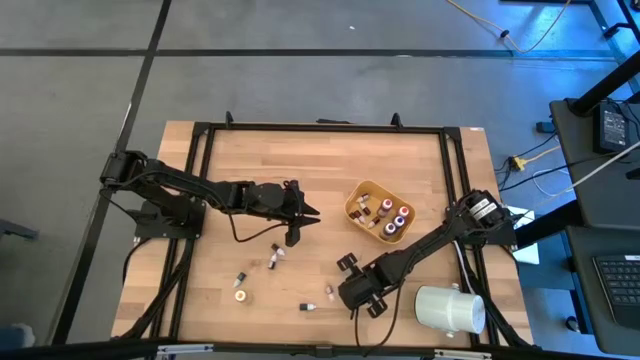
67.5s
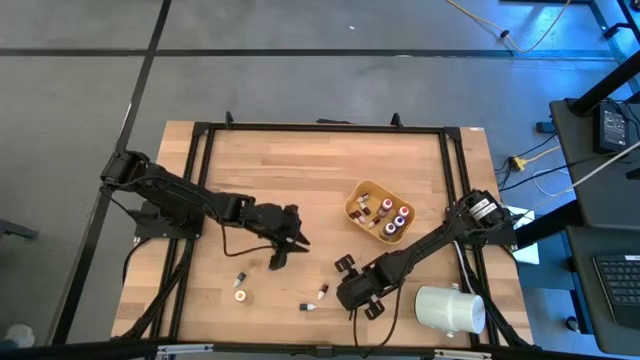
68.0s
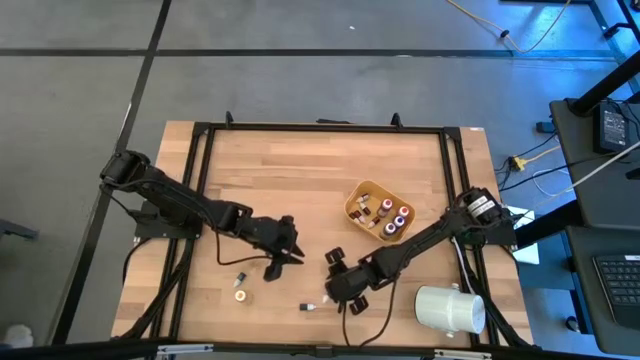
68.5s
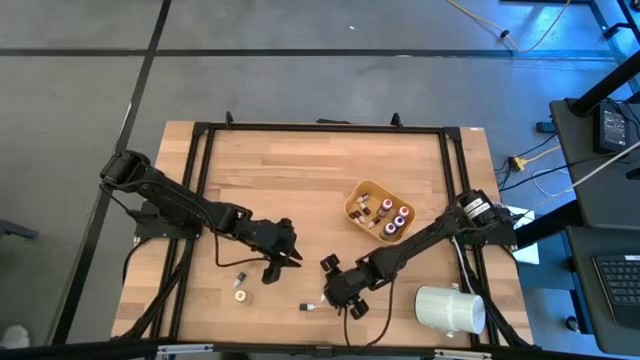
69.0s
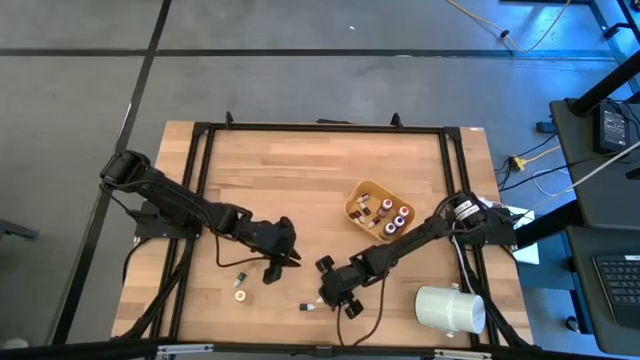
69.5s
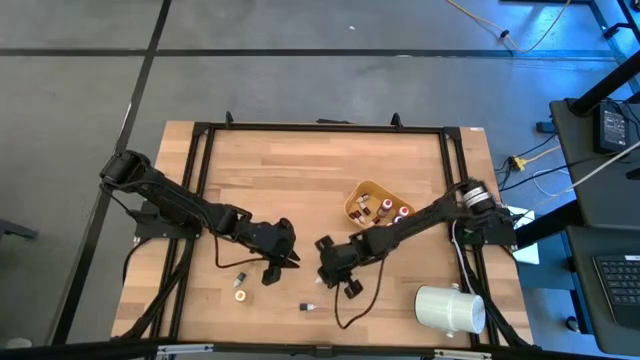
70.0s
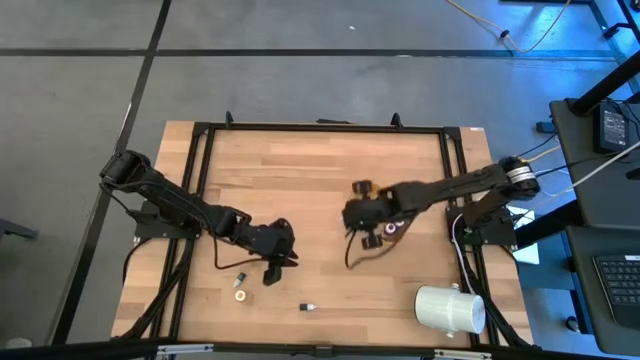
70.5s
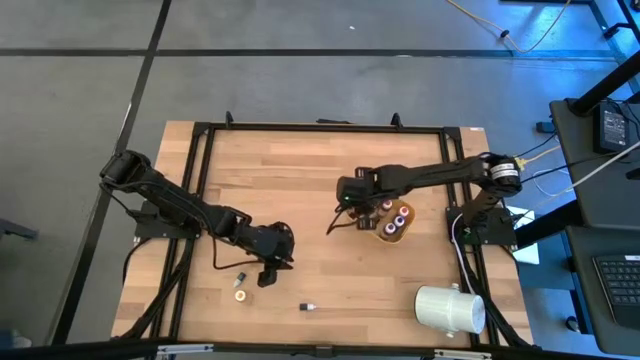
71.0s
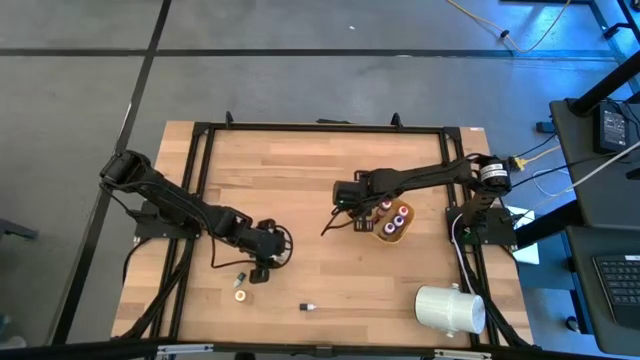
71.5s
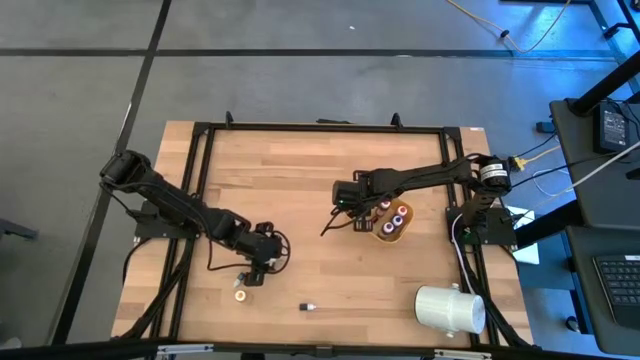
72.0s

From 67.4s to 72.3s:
Task: Pick & Place food coloring
Put the small pink food coloring bottle in the yellow bin

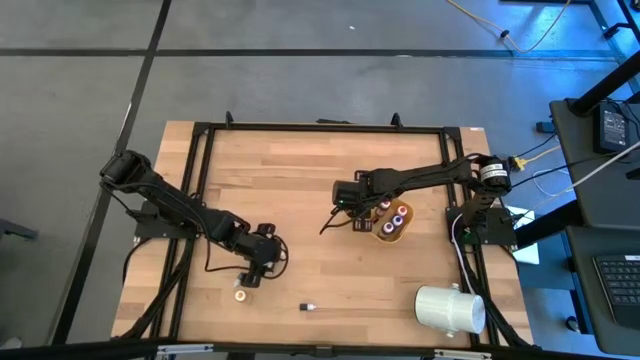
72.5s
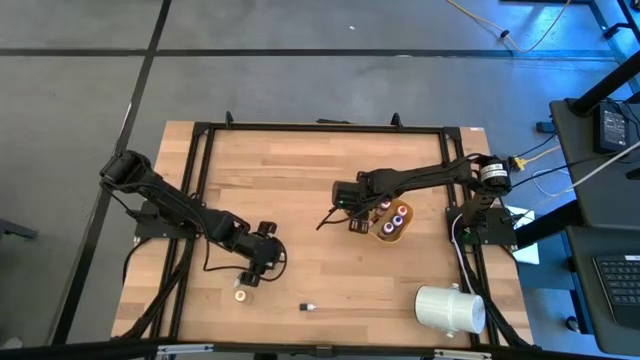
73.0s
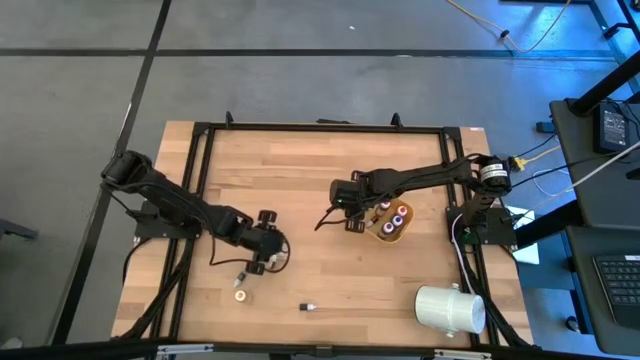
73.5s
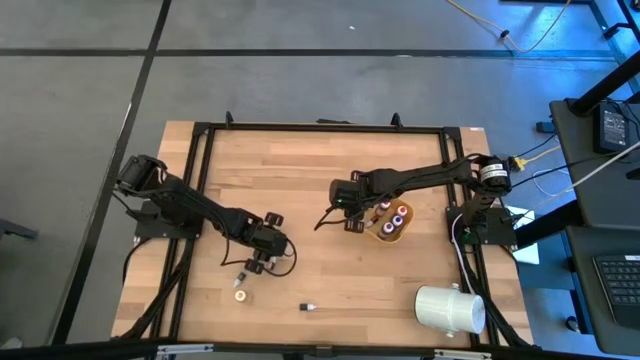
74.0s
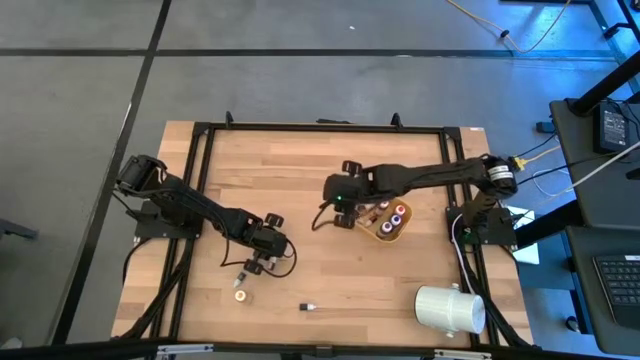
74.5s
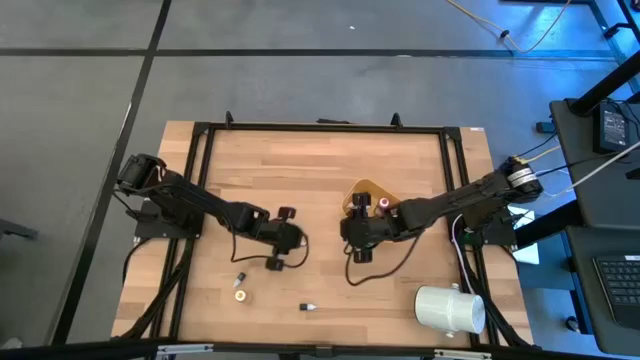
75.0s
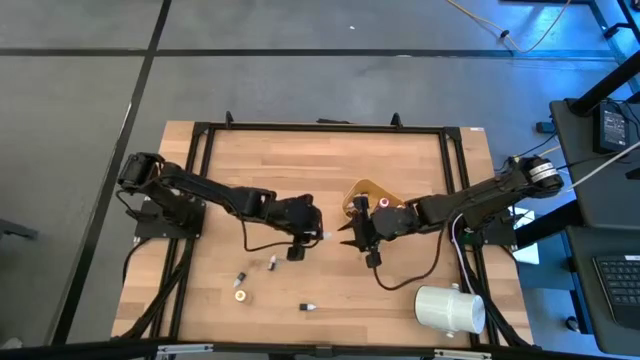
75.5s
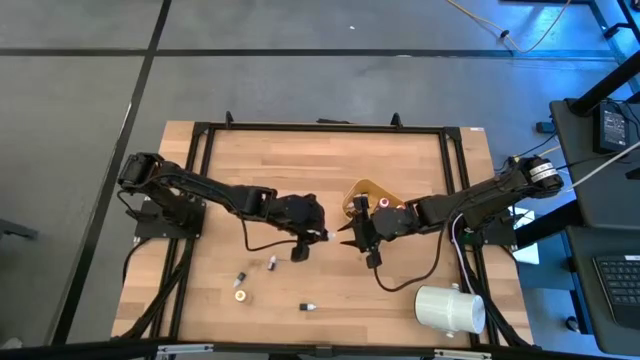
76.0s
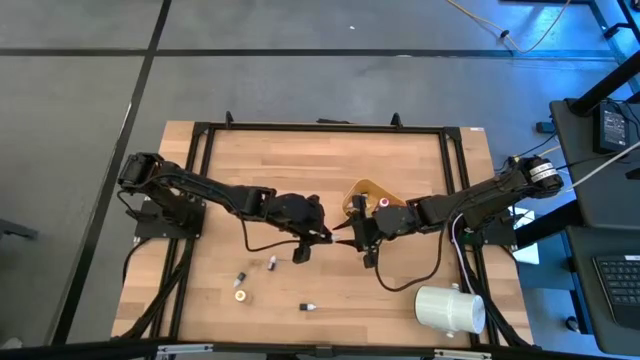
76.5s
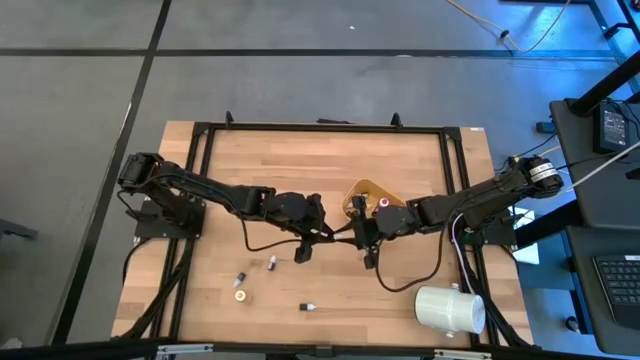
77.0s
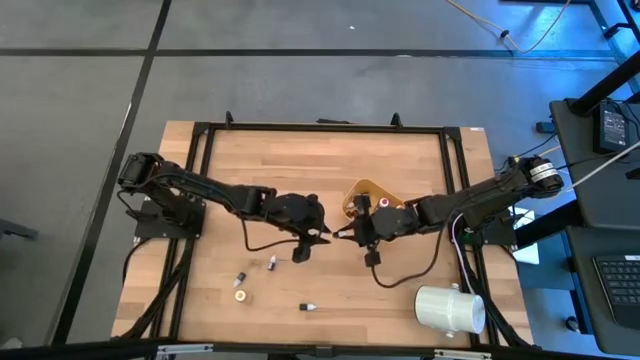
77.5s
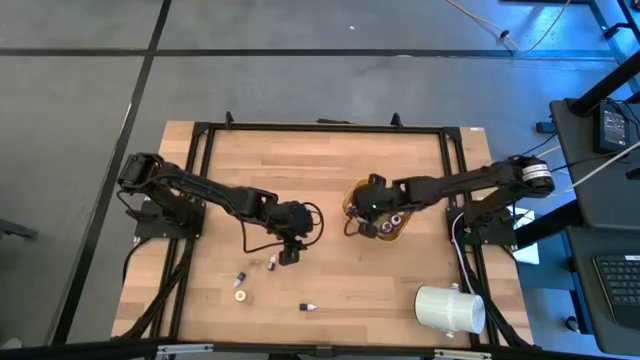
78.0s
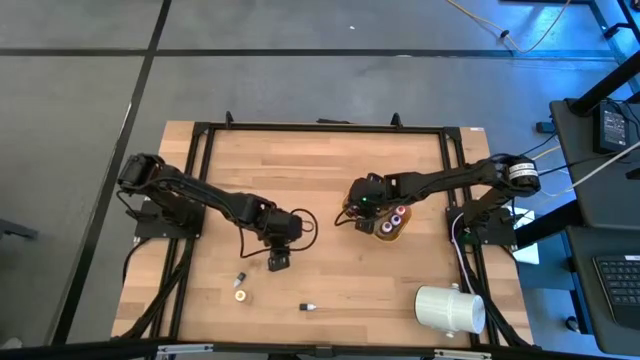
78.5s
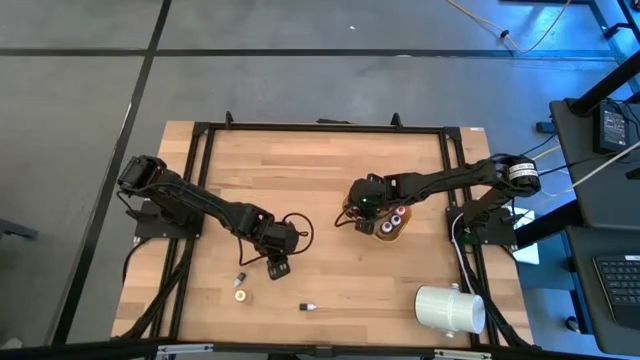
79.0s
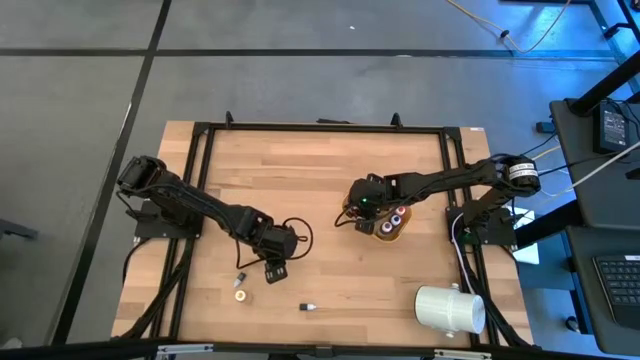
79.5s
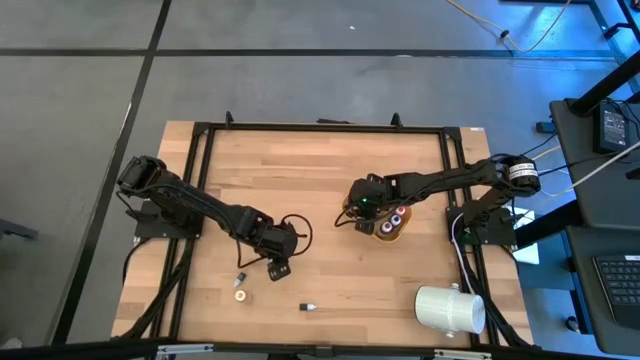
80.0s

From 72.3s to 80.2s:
Put the top small blue food coloring bottle in the yellow bin

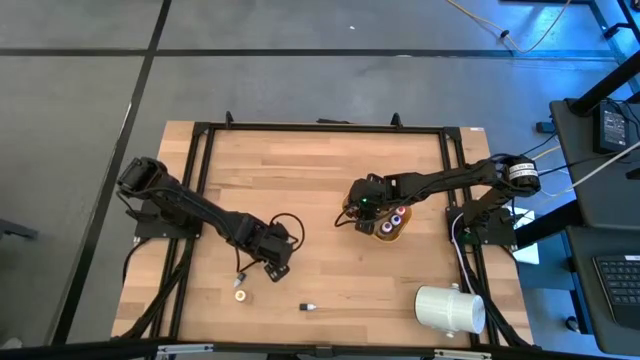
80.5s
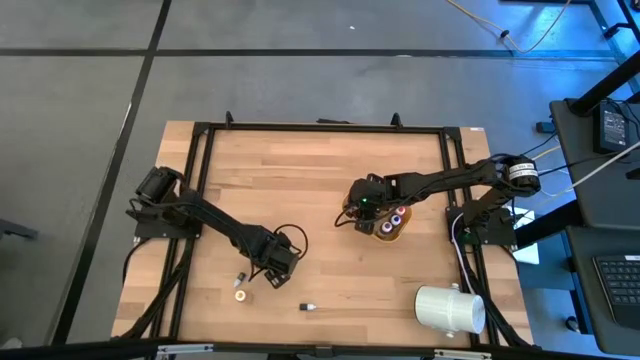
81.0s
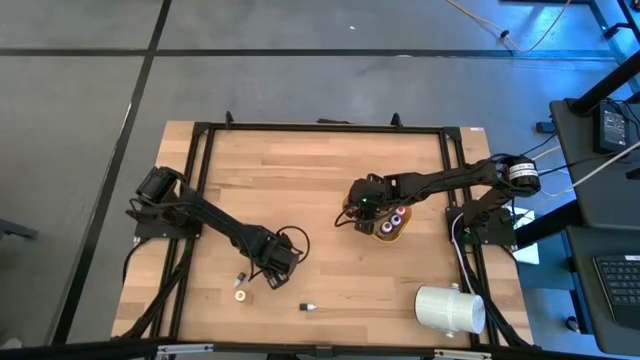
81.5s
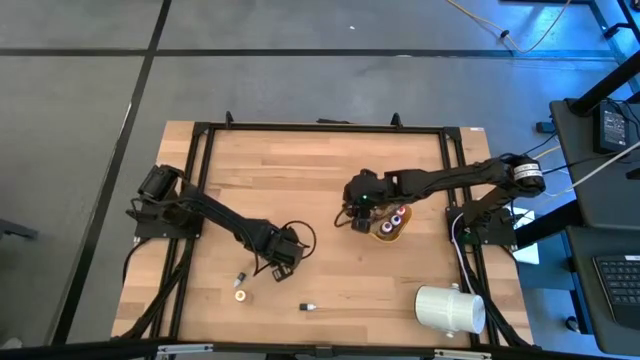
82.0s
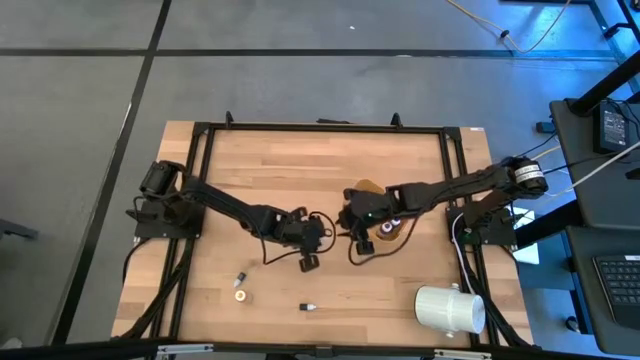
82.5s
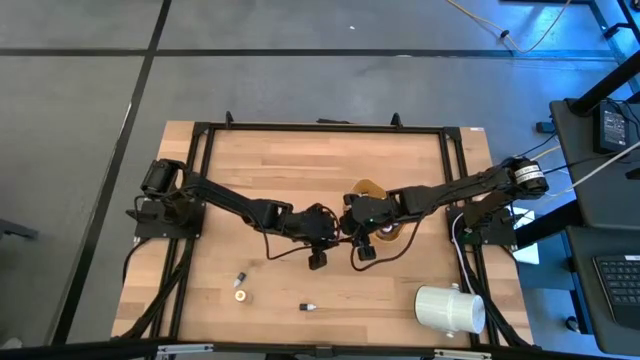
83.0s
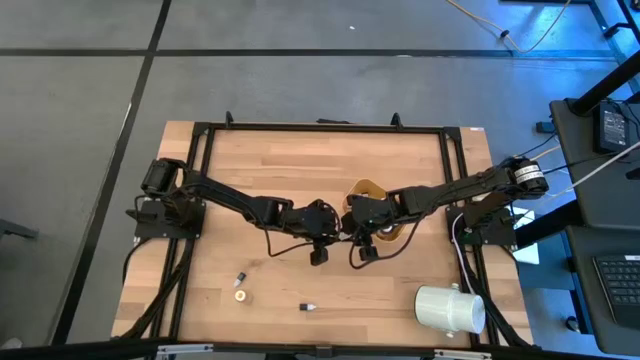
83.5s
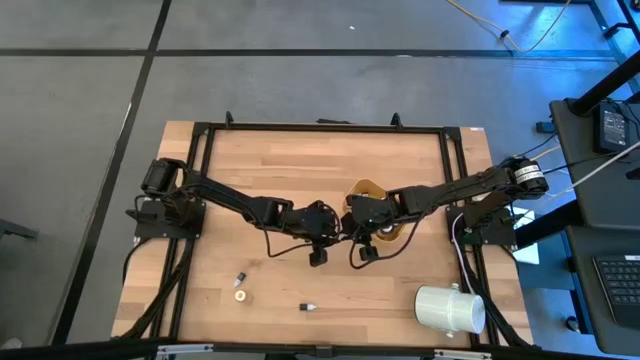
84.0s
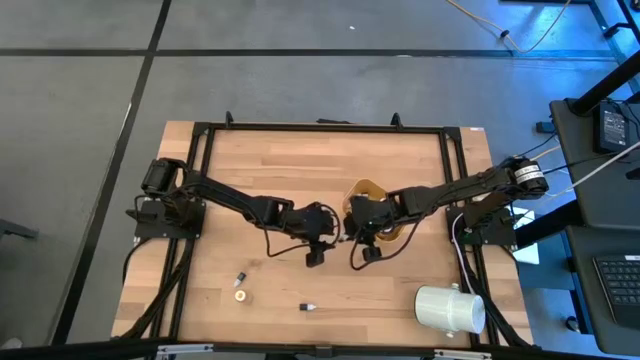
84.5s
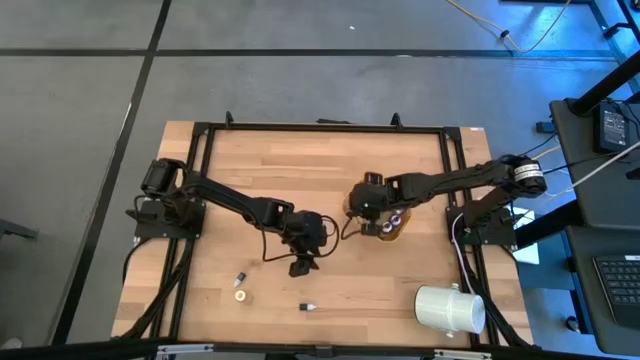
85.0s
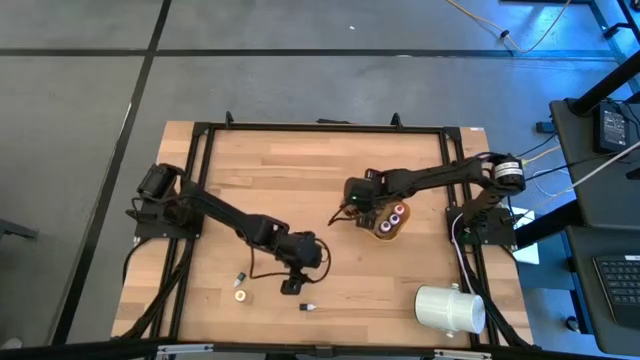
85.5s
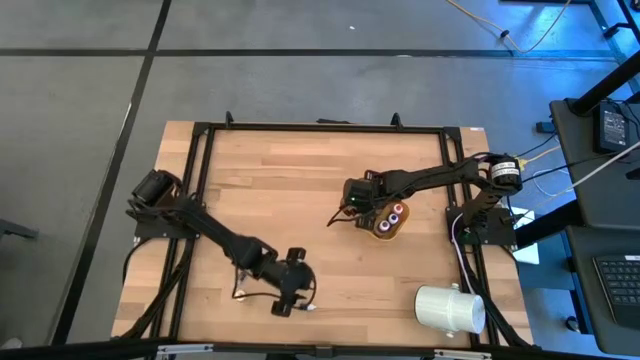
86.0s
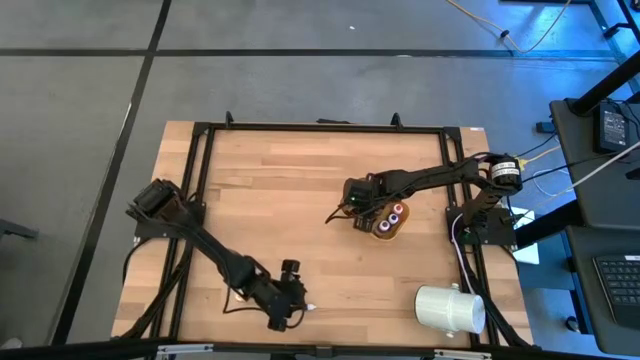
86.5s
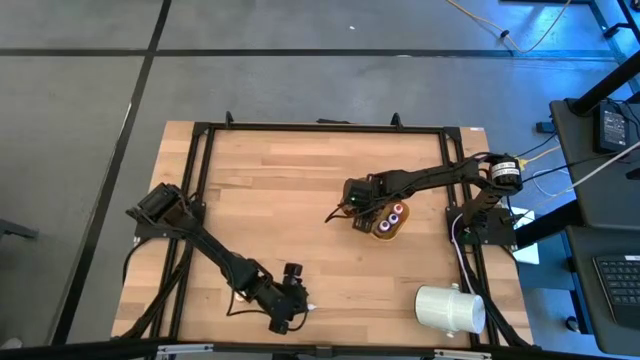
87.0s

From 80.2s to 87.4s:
Put the top small blue food coloring bottle in the yellow bin

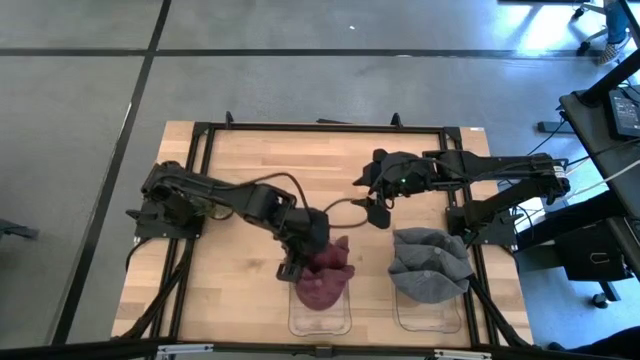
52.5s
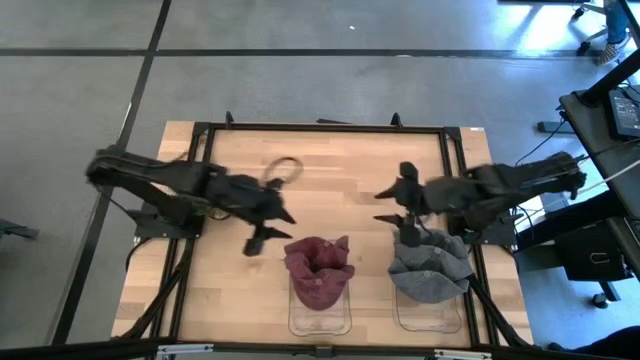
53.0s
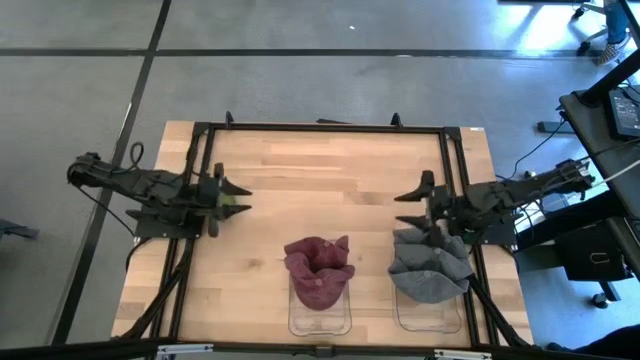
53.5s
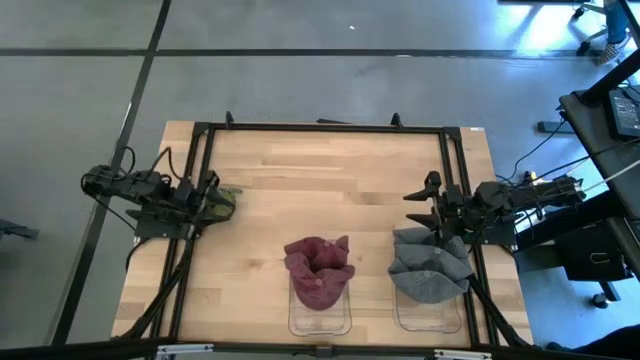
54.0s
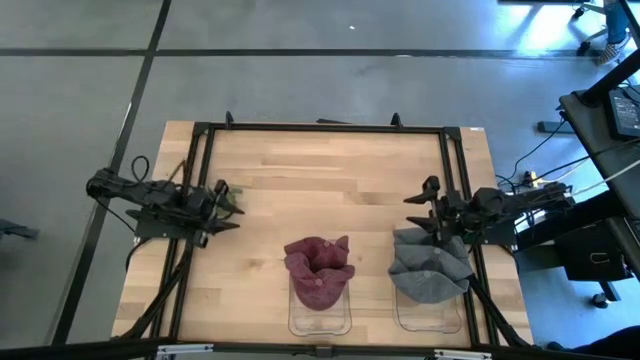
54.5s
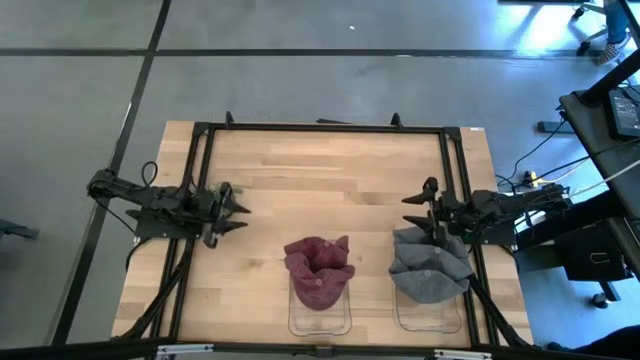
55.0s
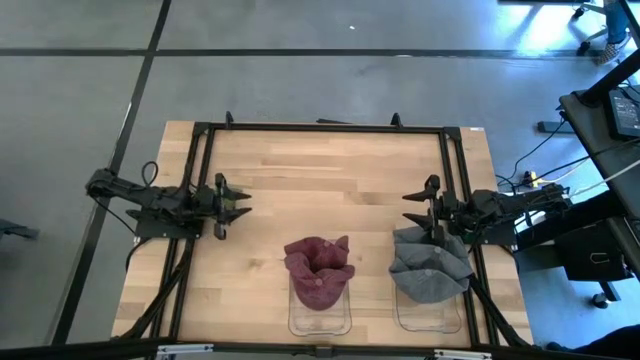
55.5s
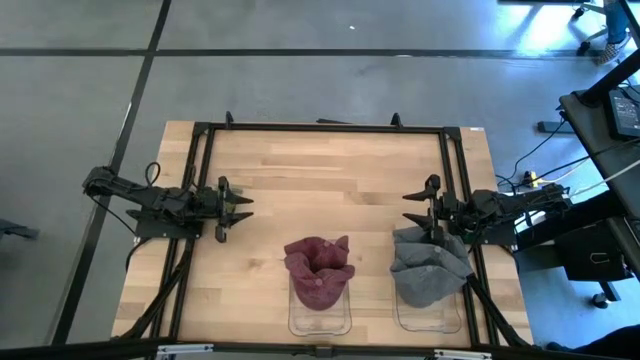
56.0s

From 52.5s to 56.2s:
Task: Pick & Place hat
Return to Home Position
